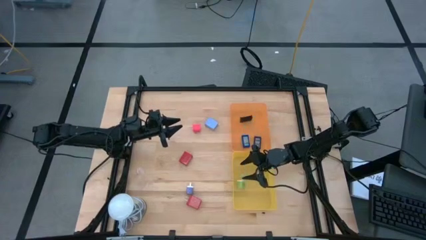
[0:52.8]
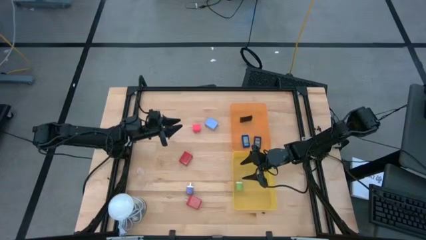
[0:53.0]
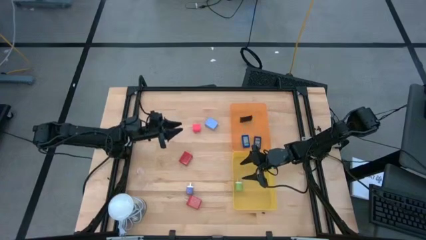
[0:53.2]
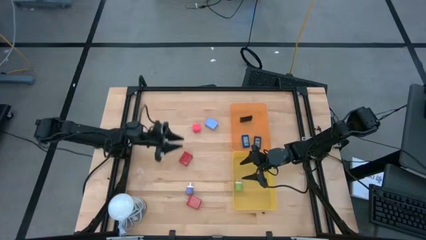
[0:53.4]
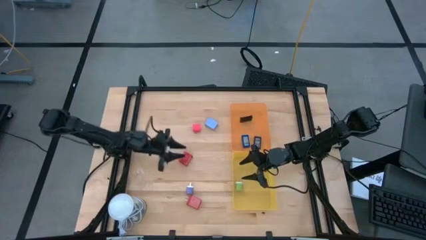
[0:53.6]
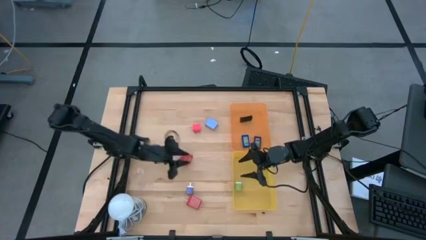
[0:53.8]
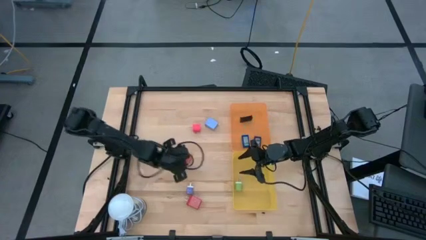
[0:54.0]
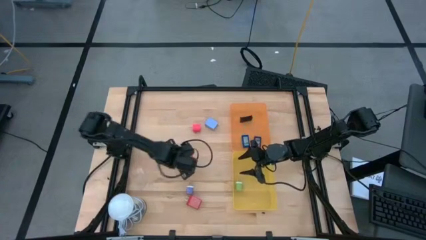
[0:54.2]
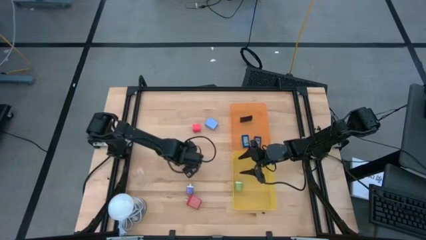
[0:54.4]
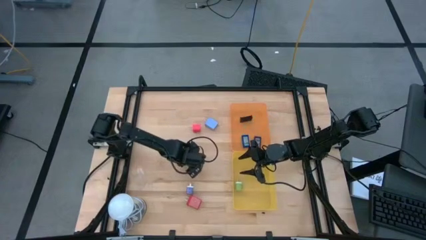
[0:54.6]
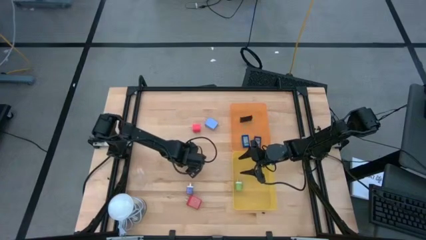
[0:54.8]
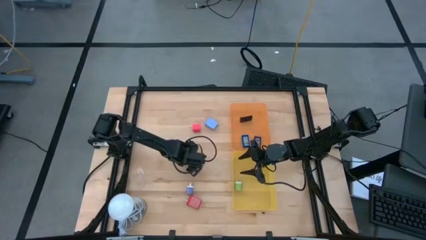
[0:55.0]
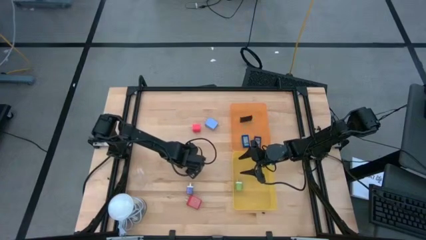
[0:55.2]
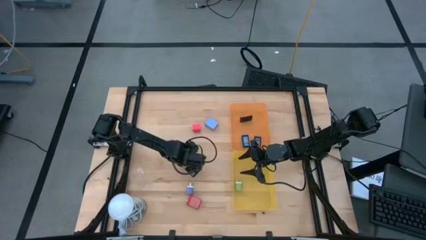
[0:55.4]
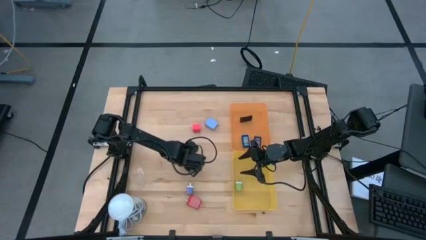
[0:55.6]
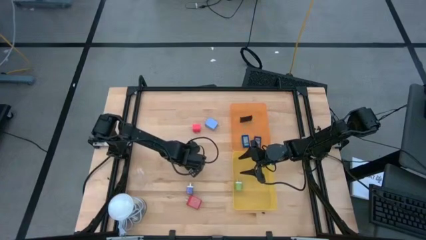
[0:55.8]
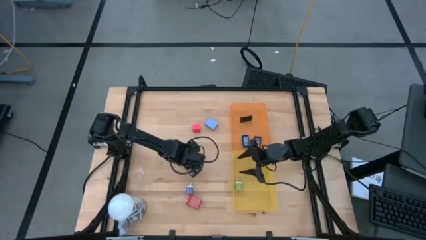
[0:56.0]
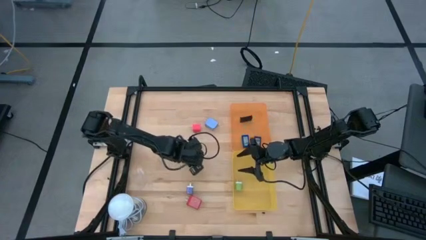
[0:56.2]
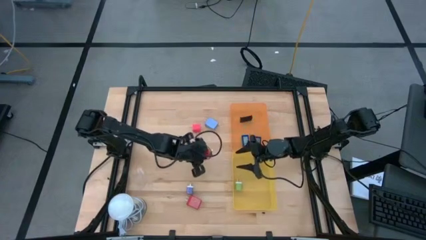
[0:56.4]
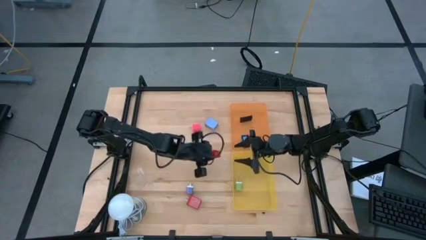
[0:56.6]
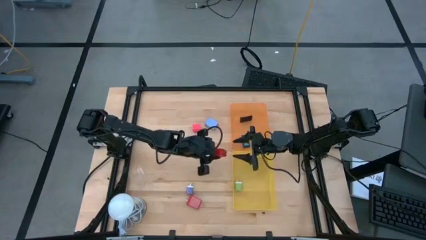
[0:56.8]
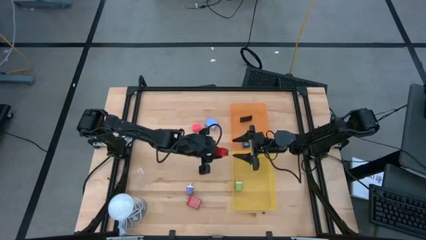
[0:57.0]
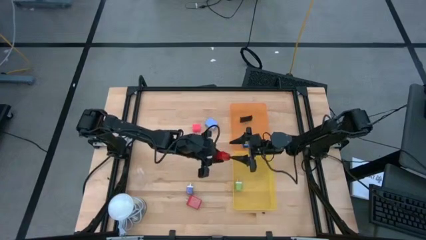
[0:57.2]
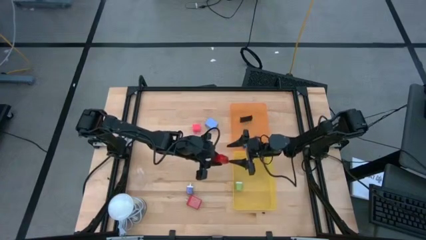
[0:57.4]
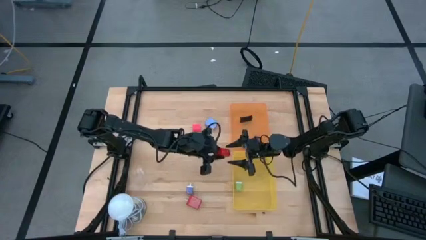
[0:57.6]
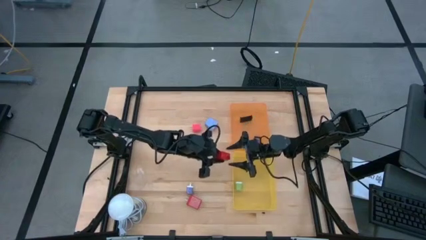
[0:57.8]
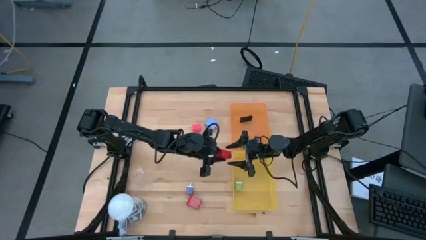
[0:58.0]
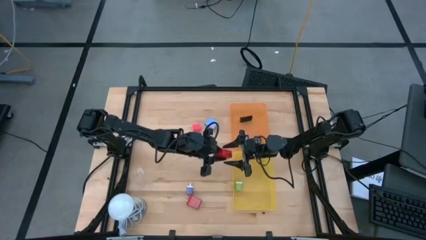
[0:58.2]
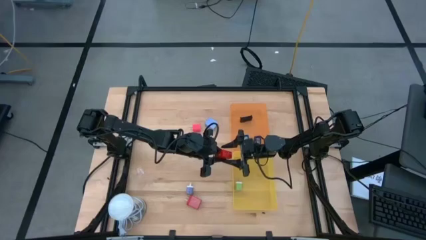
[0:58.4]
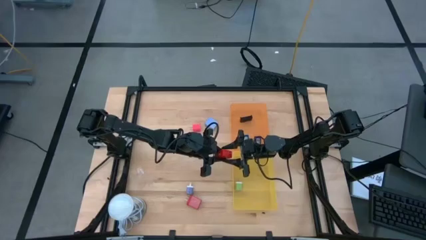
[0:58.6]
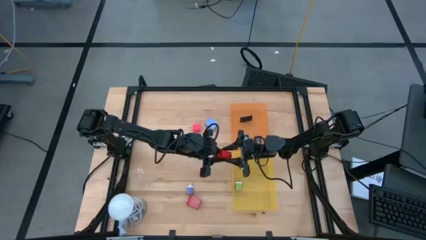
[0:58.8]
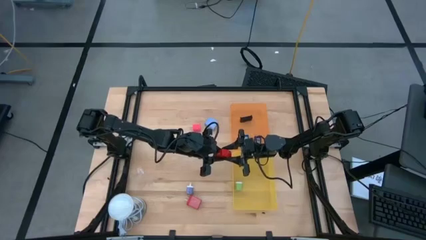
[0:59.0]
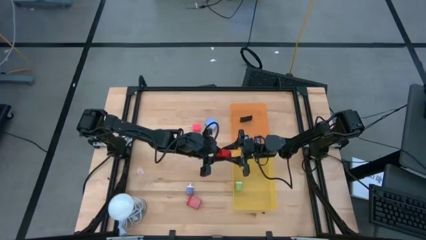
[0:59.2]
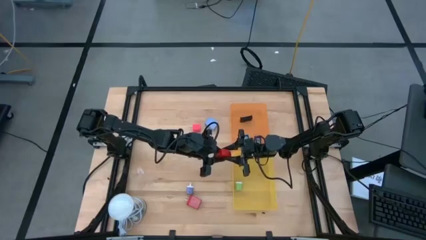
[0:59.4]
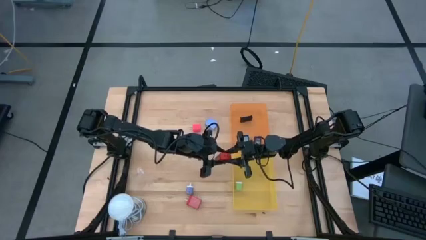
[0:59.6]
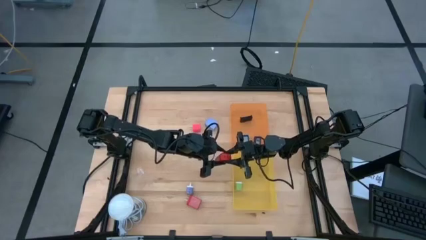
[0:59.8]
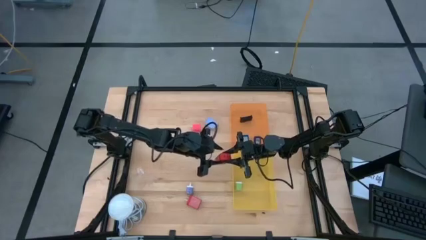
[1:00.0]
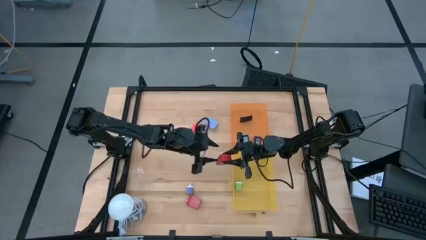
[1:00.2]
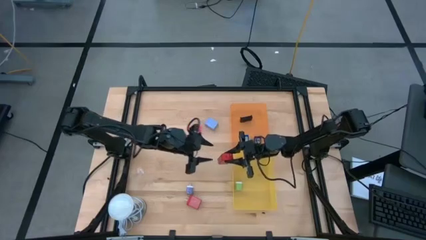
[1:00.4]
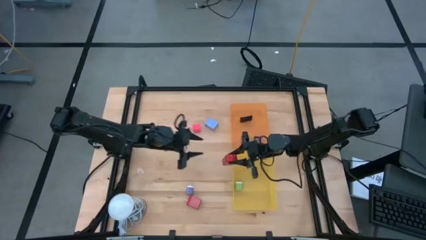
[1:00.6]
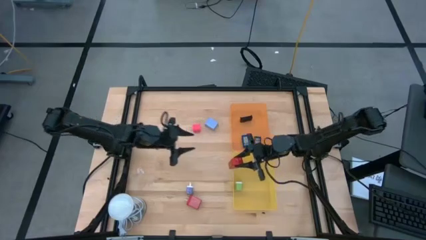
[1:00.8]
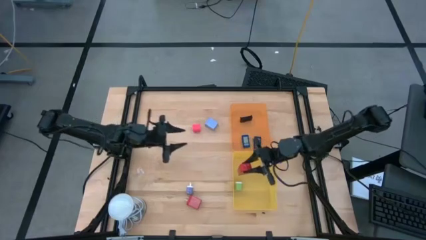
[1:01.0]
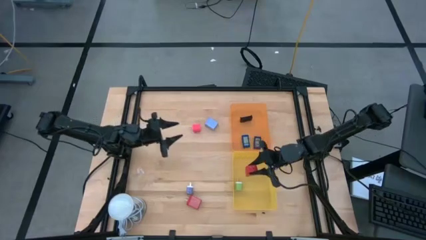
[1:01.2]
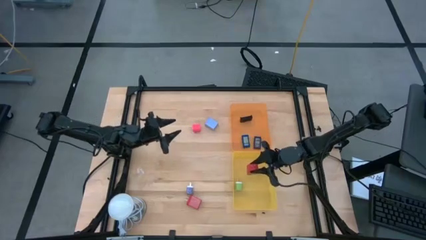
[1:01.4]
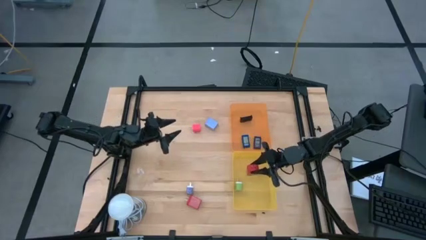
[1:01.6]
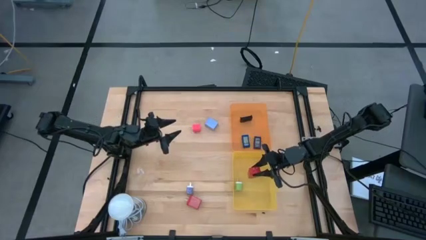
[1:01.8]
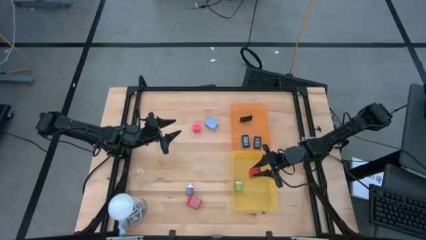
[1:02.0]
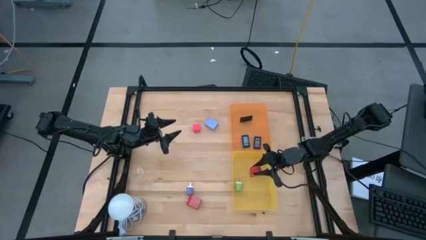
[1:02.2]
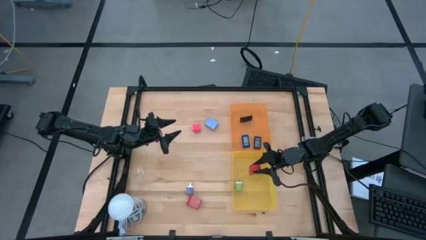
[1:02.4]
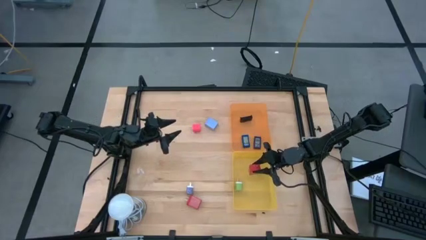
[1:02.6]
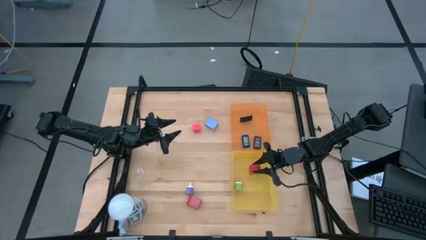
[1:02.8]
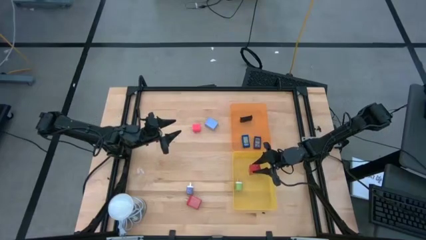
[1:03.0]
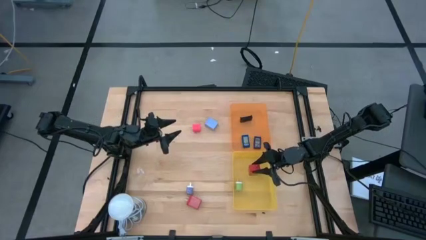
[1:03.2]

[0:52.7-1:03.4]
Task: Pick & Place Office items
Put the top red charger adapter into the yellow bin
